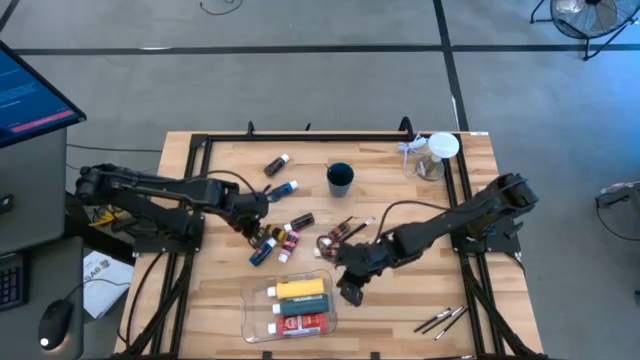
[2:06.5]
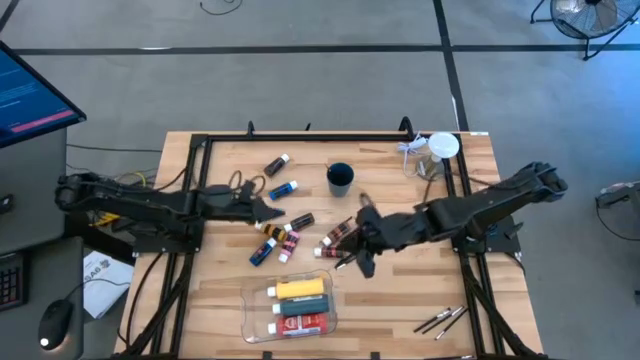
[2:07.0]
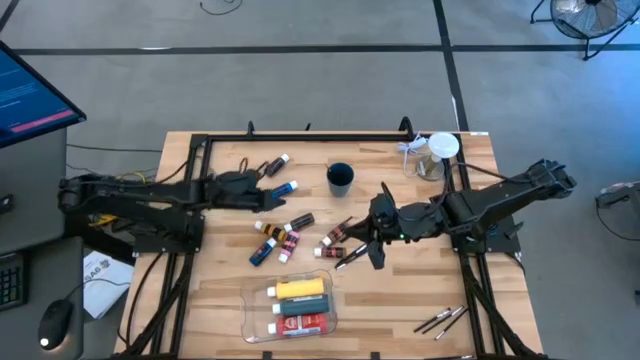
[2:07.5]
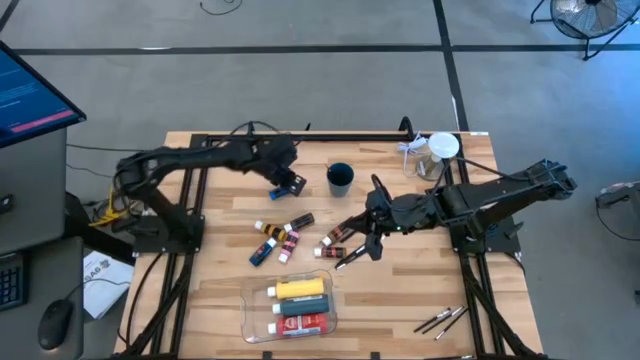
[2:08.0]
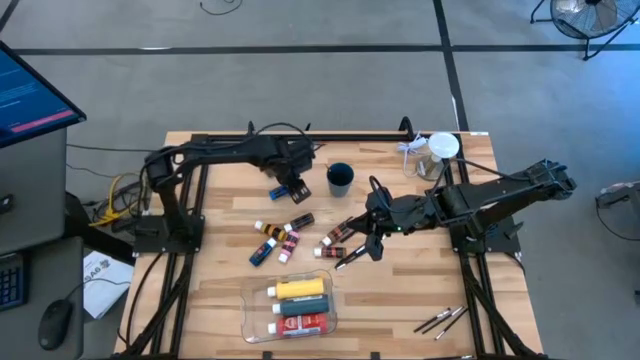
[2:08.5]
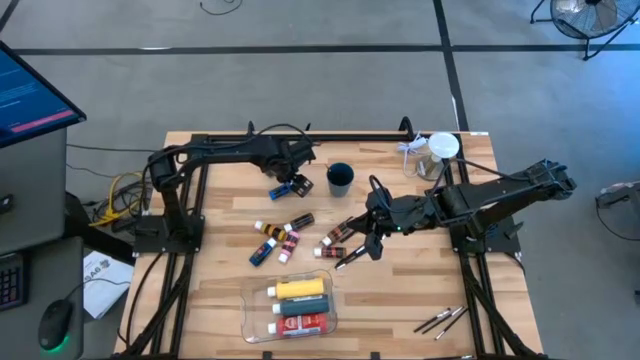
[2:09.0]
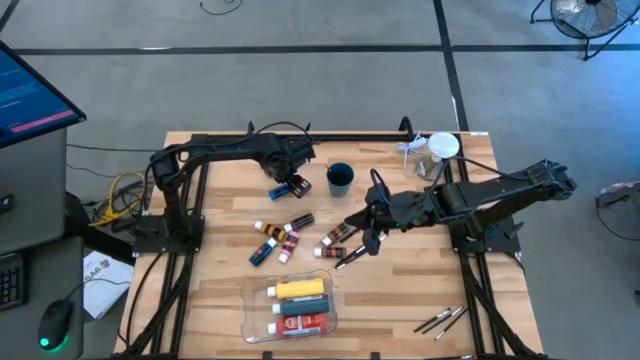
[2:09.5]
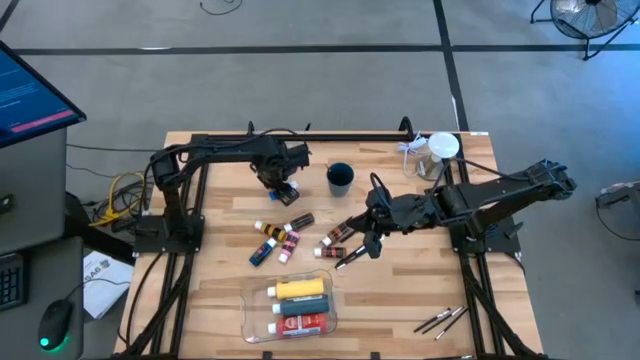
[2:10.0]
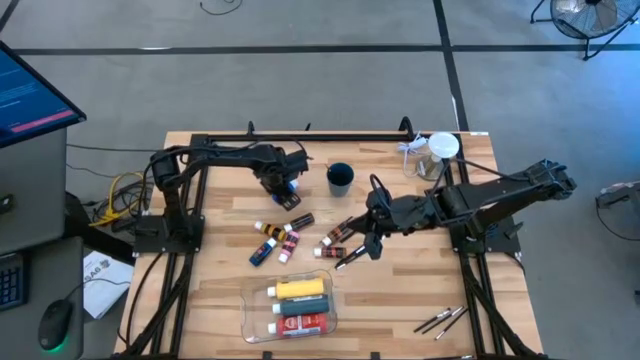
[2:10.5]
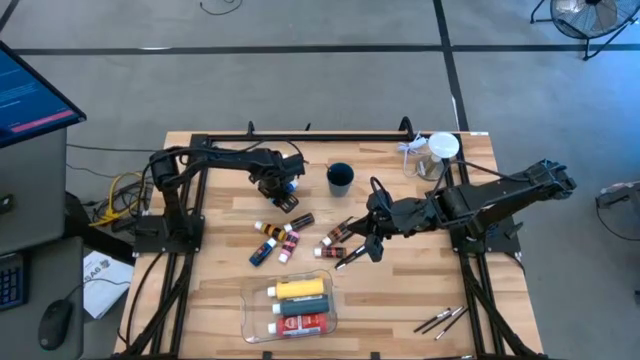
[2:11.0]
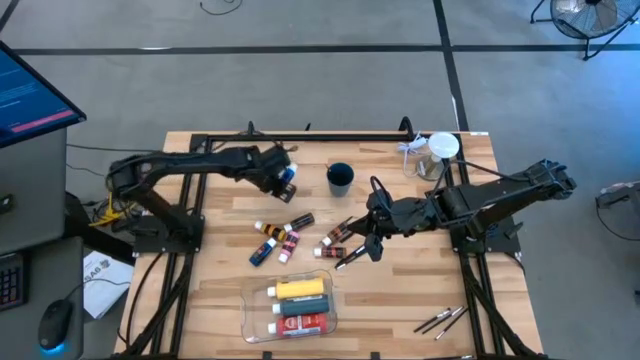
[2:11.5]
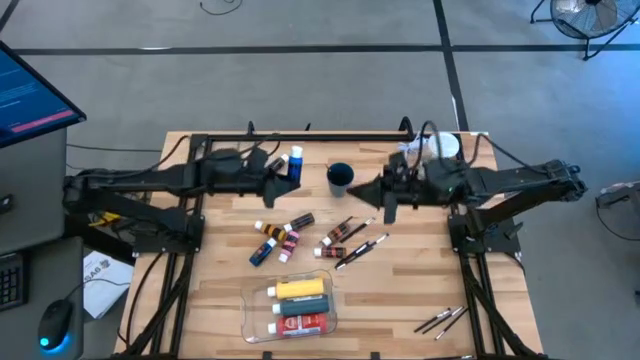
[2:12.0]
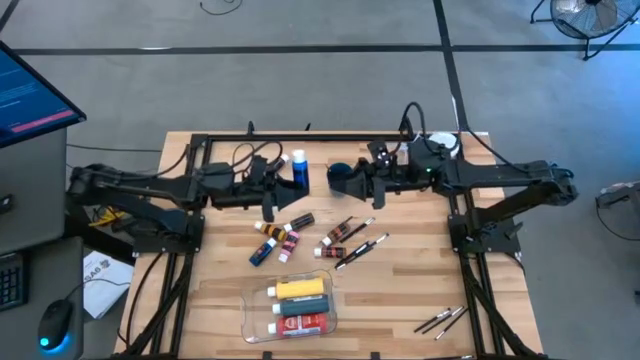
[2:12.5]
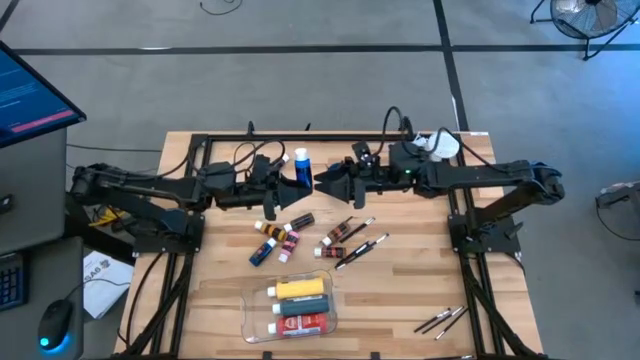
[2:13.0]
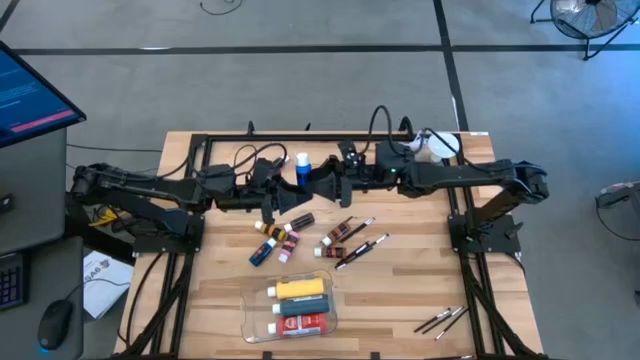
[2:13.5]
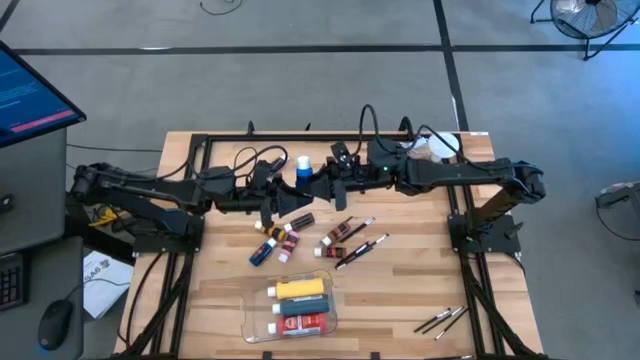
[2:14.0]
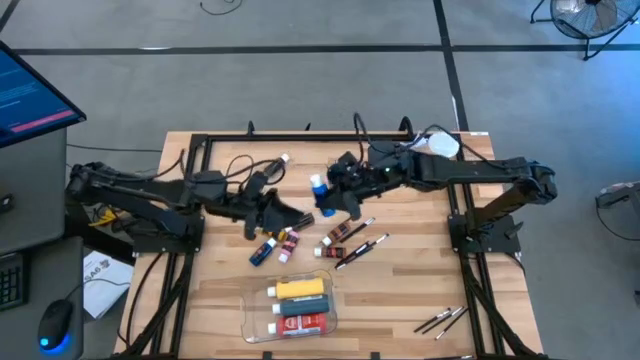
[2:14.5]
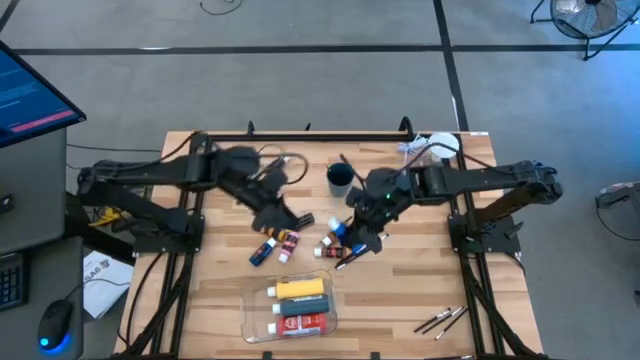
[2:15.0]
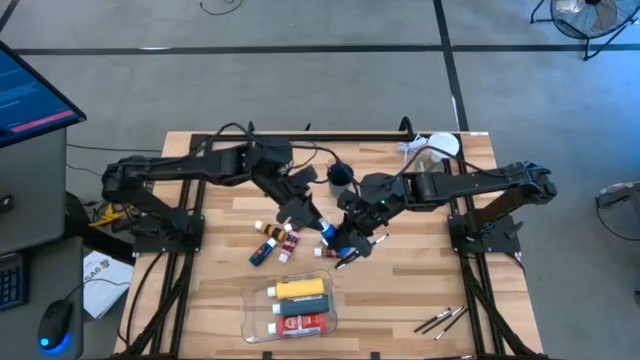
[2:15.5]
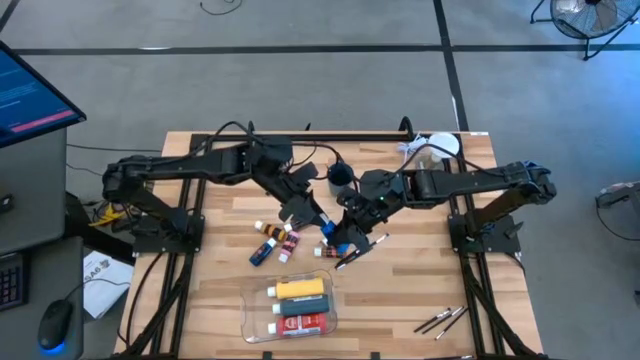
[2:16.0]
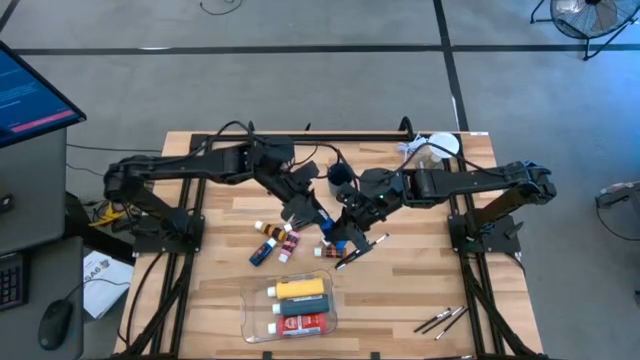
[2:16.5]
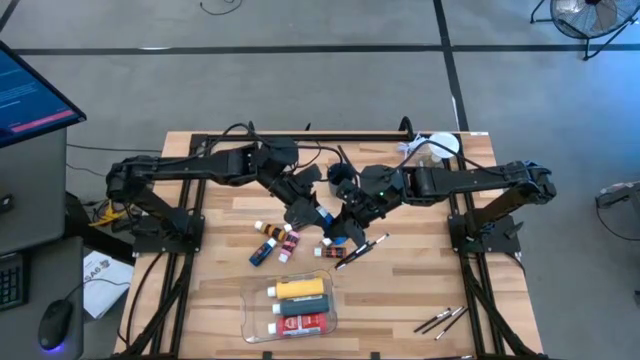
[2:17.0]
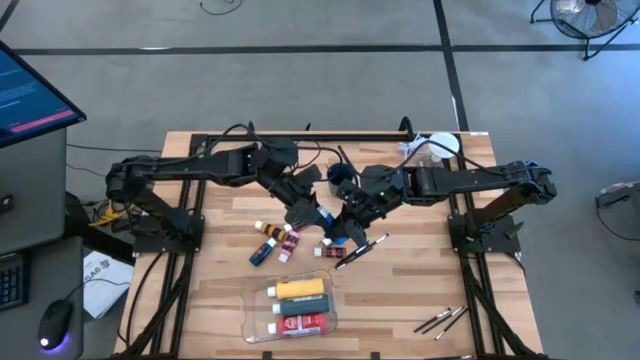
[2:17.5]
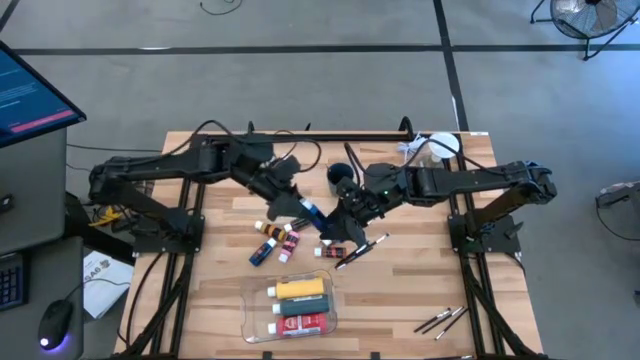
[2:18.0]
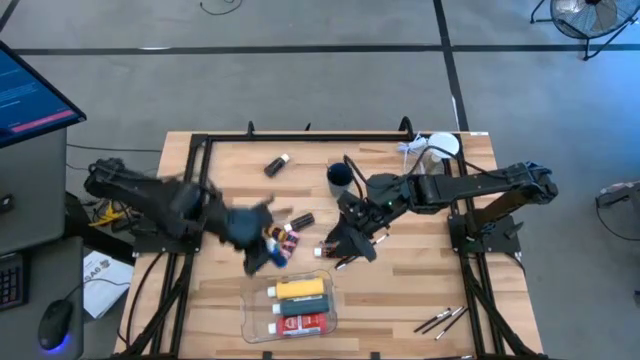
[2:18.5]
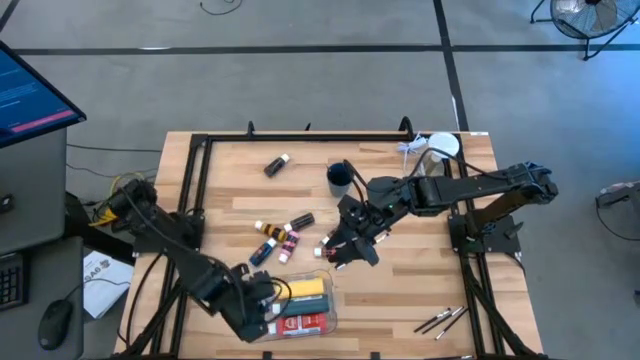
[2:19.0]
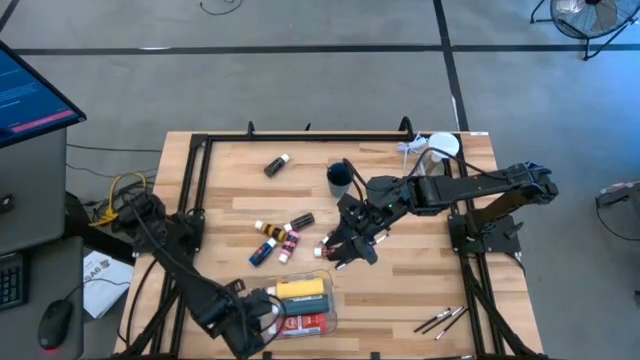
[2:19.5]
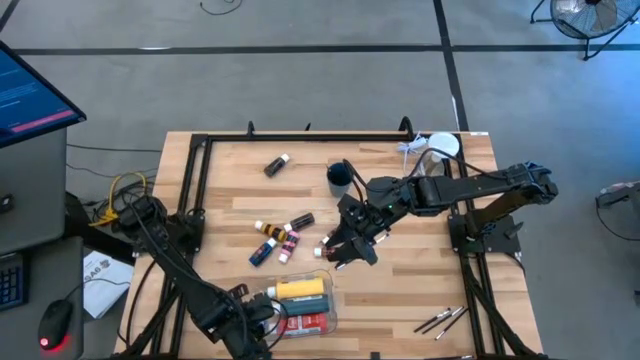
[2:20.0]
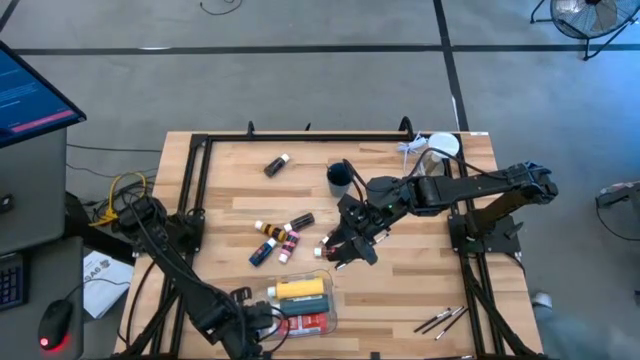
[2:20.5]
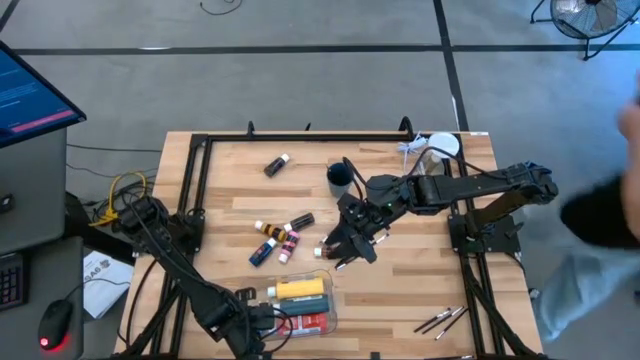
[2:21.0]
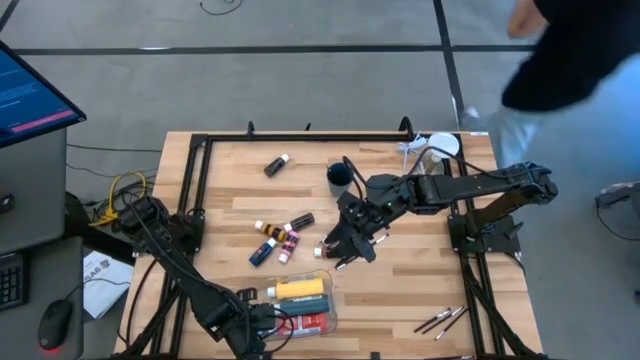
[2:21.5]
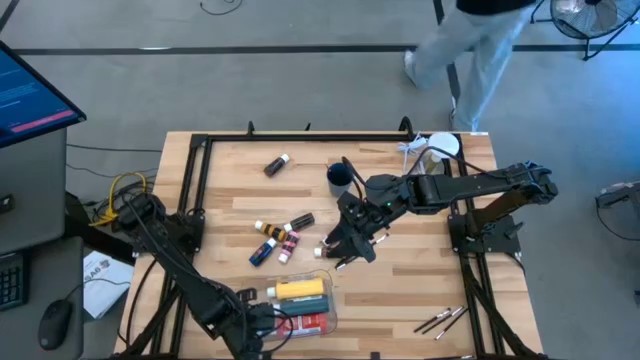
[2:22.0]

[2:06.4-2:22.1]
Task: Pick & Place Paint Supplies
Put the top small blue paint bottle into the transparent bin

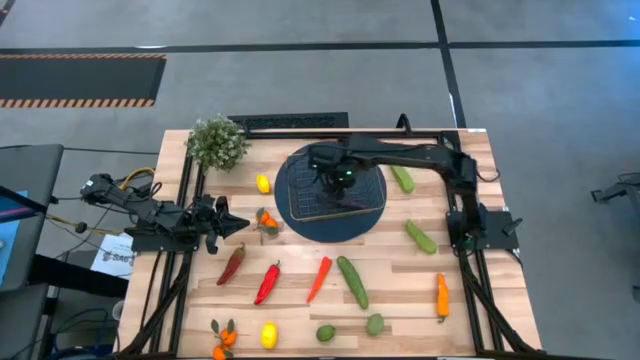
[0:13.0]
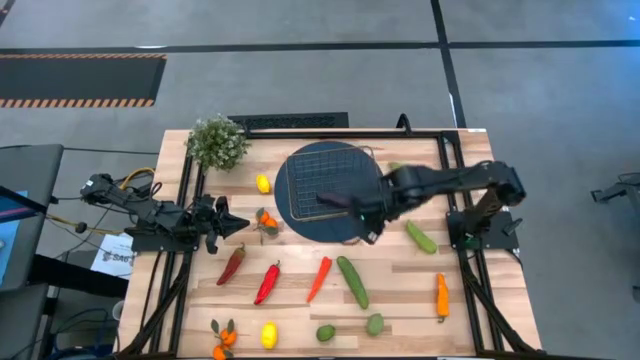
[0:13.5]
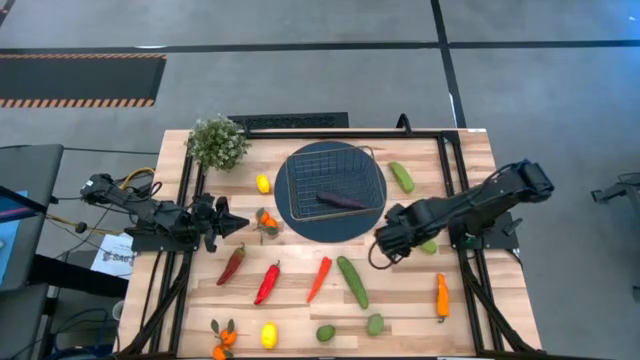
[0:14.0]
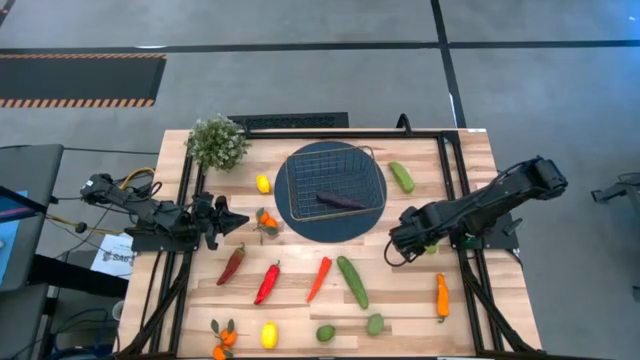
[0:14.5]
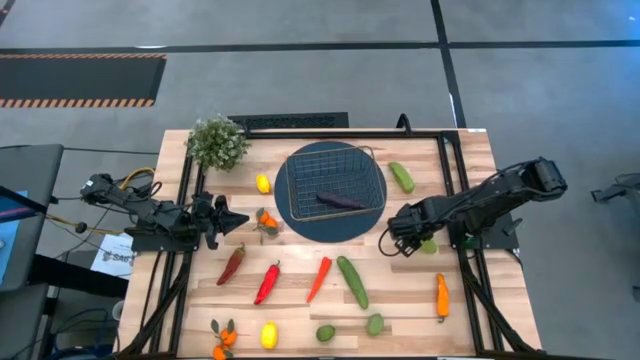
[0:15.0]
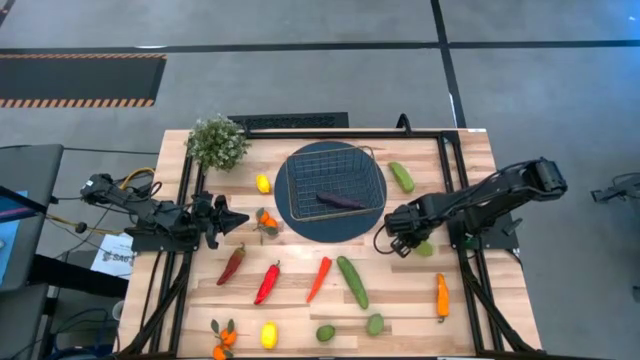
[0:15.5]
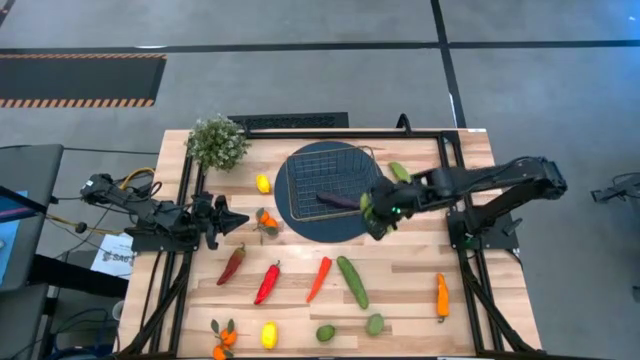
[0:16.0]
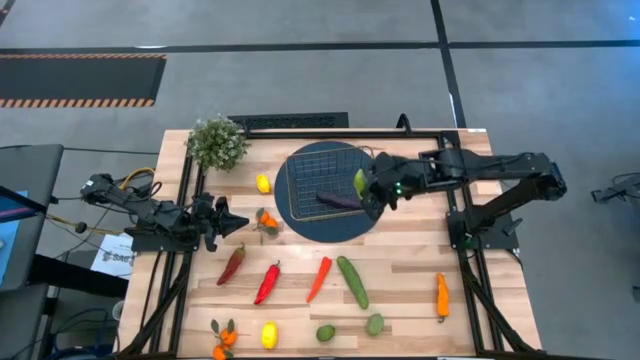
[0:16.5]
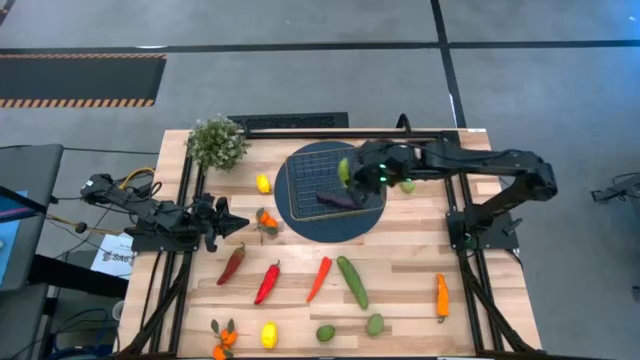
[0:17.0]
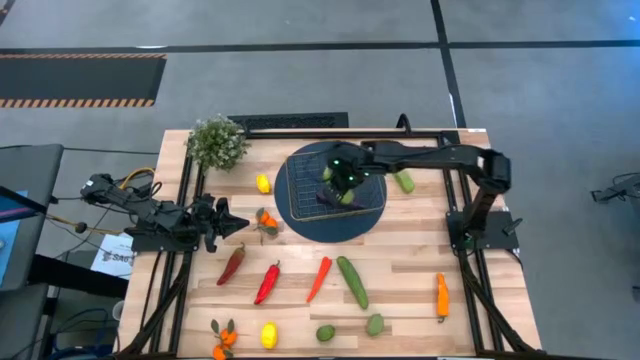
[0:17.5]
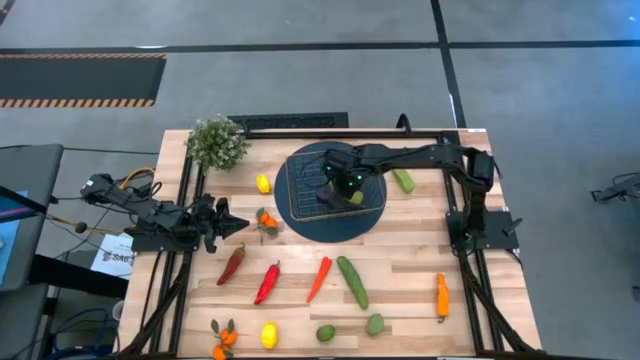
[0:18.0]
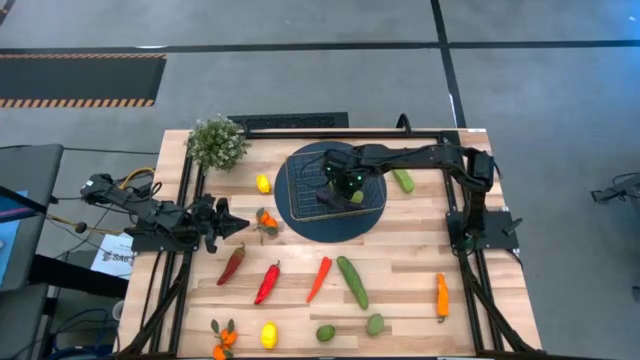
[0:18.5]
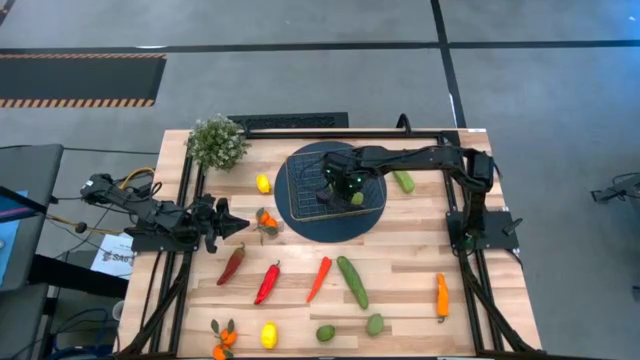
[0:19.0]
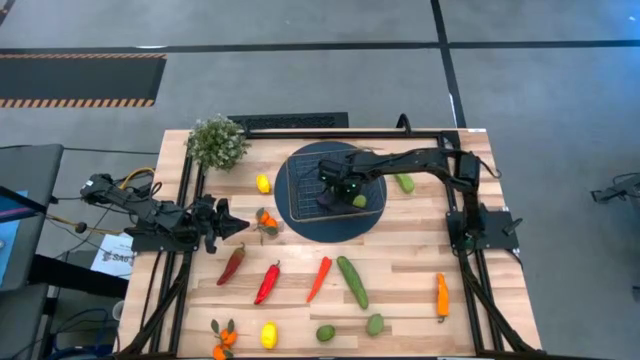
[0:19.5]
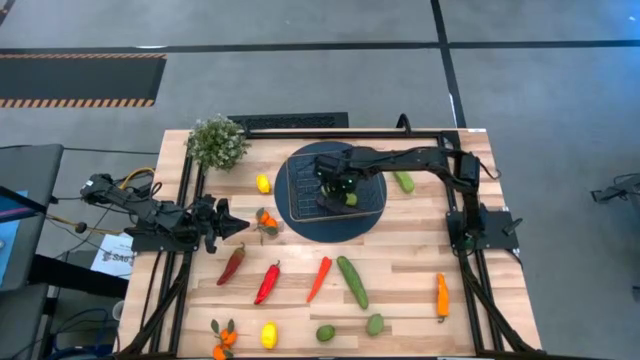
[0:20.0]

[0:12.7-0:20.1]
Task: Build produce basket
Put the middle cucumber into the basket
